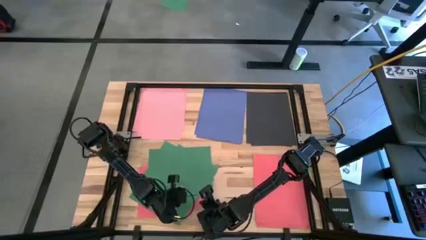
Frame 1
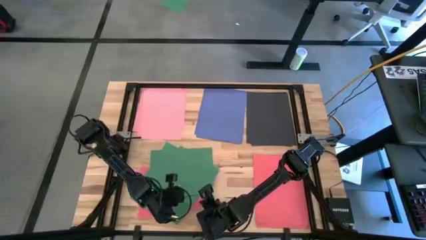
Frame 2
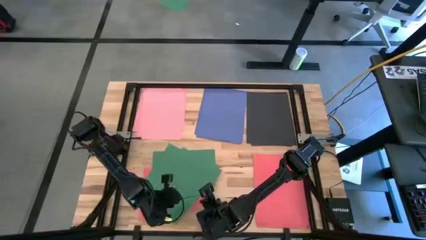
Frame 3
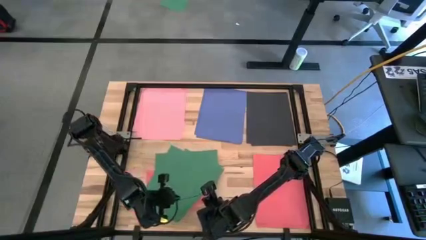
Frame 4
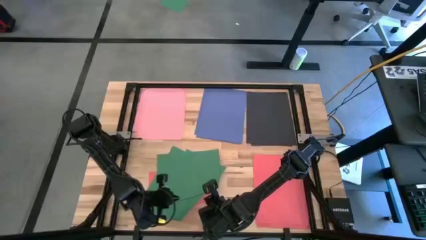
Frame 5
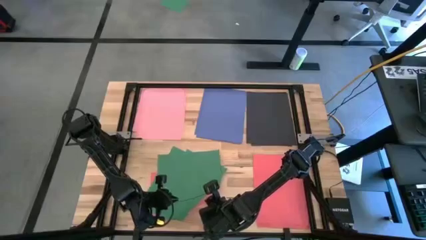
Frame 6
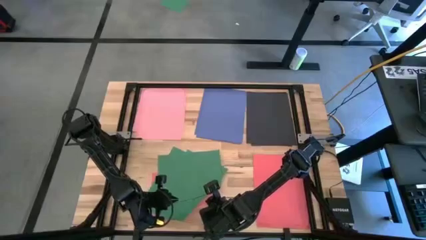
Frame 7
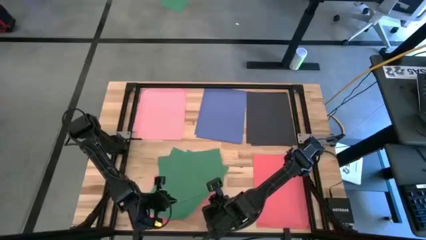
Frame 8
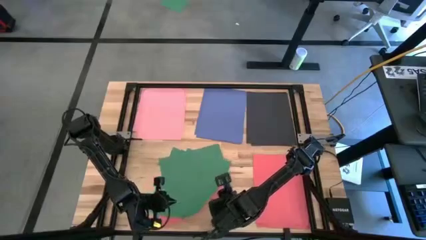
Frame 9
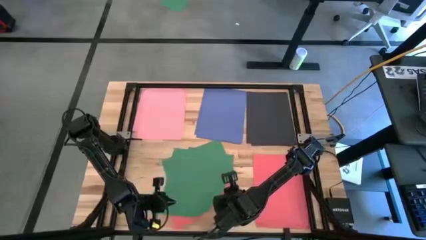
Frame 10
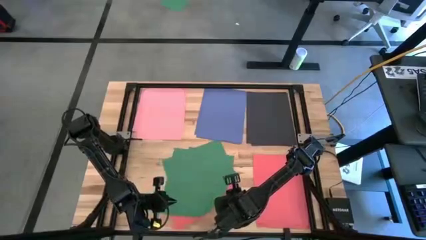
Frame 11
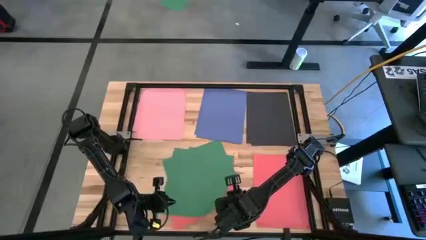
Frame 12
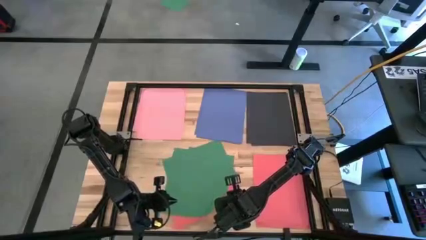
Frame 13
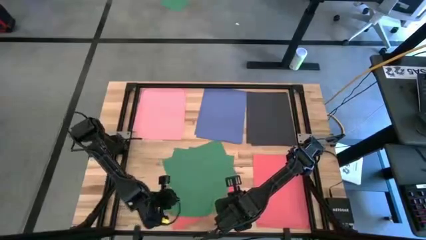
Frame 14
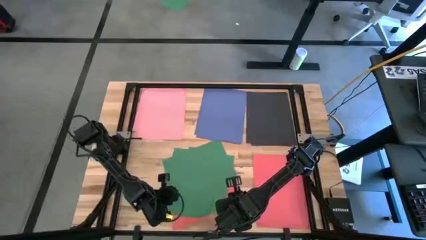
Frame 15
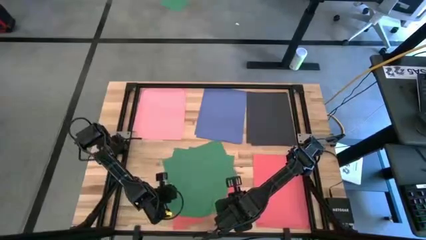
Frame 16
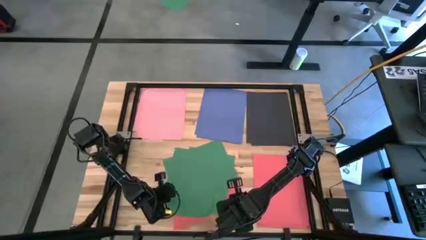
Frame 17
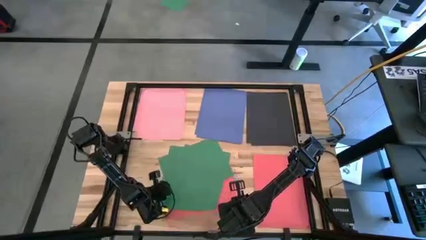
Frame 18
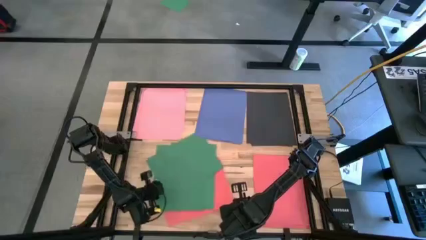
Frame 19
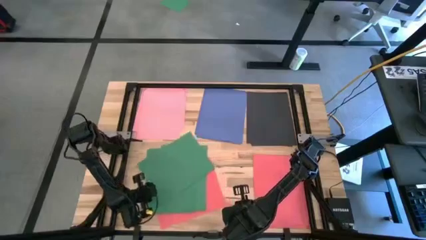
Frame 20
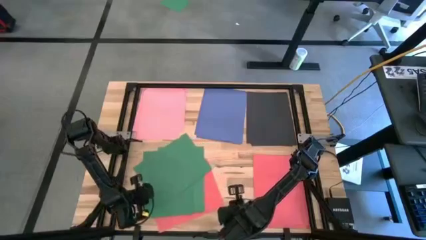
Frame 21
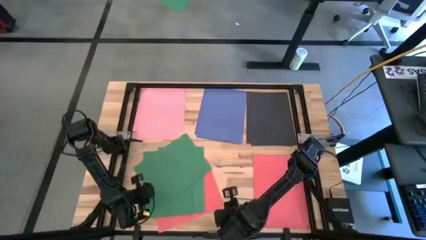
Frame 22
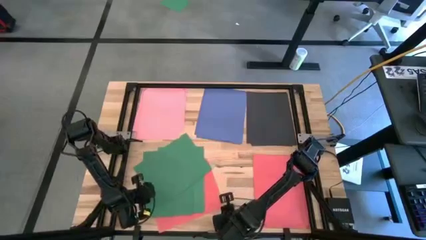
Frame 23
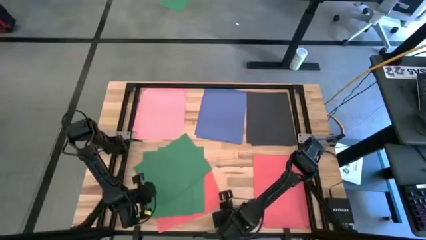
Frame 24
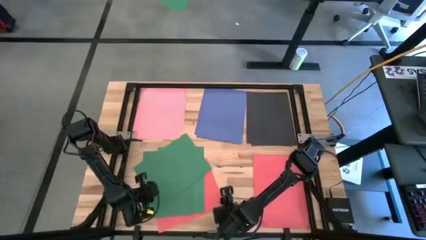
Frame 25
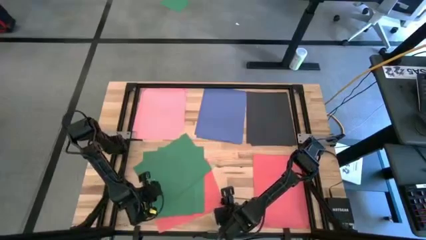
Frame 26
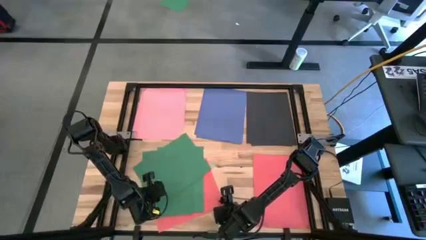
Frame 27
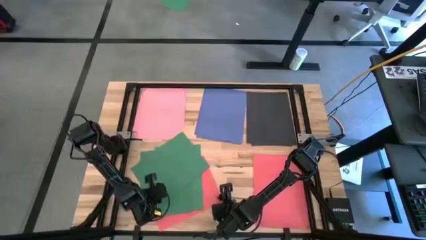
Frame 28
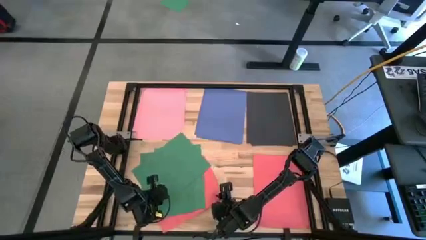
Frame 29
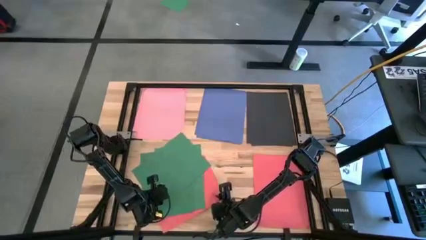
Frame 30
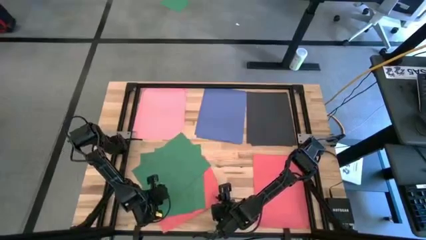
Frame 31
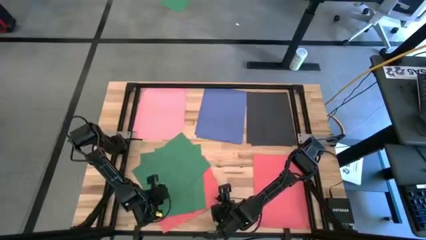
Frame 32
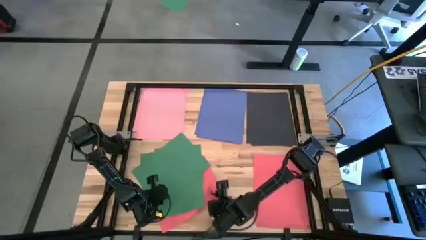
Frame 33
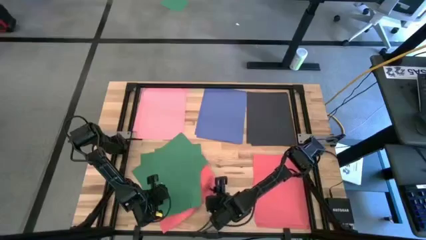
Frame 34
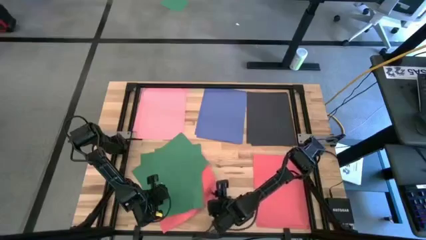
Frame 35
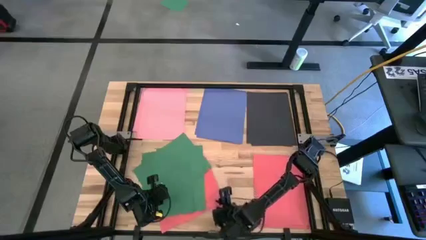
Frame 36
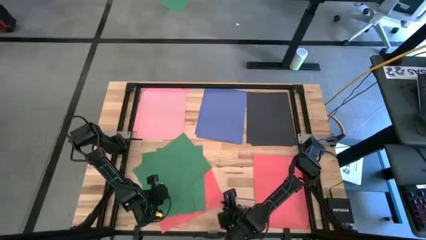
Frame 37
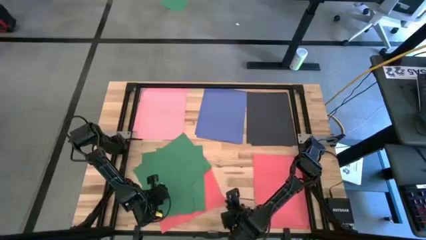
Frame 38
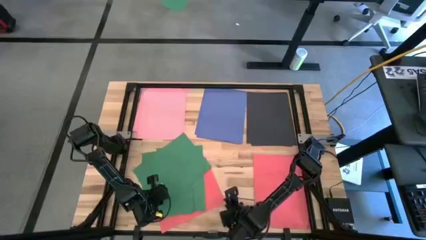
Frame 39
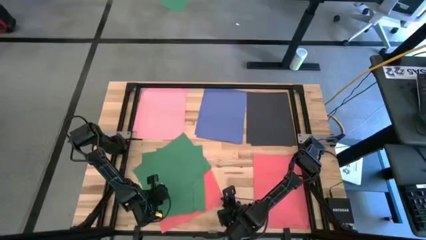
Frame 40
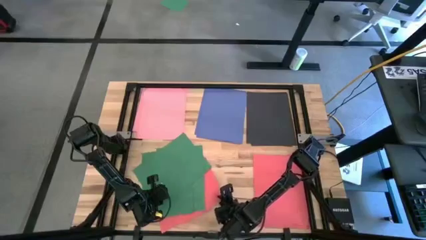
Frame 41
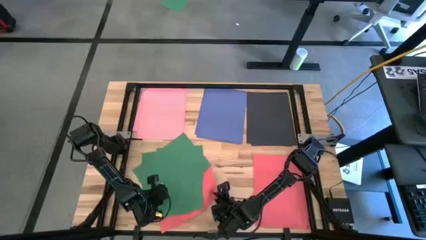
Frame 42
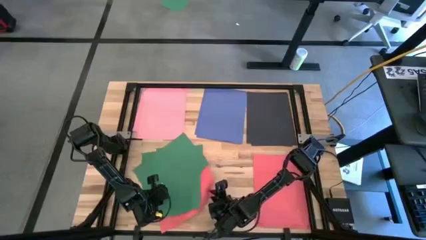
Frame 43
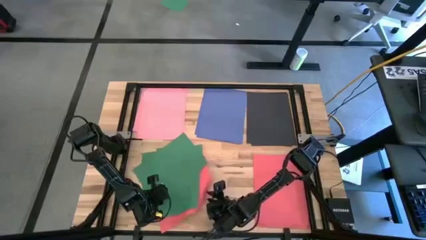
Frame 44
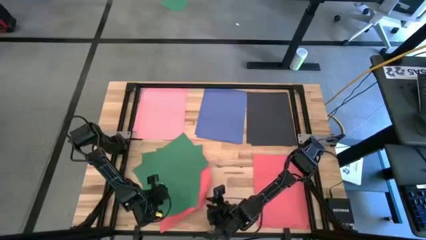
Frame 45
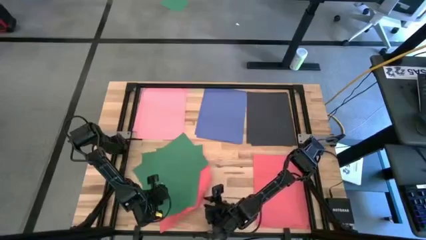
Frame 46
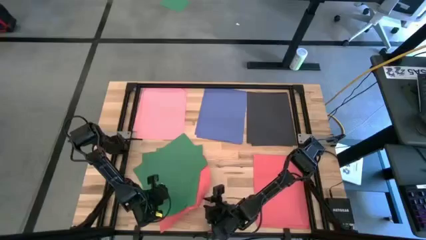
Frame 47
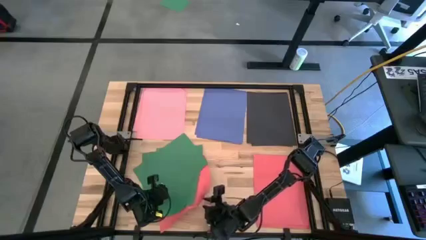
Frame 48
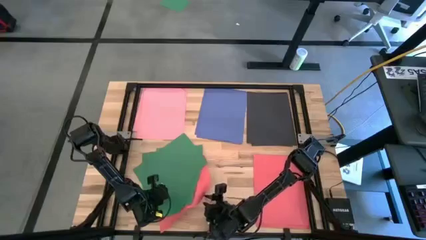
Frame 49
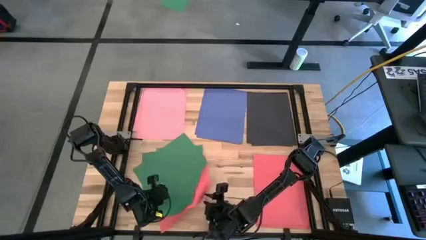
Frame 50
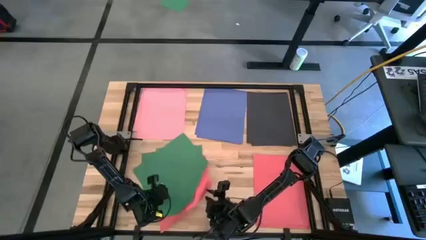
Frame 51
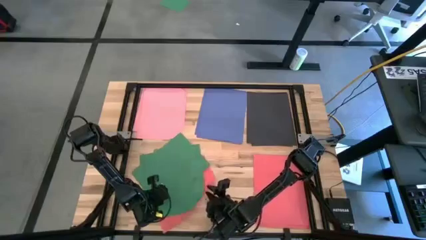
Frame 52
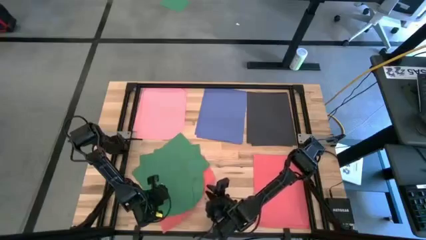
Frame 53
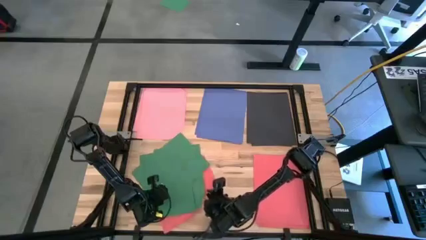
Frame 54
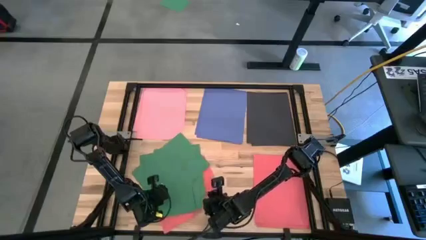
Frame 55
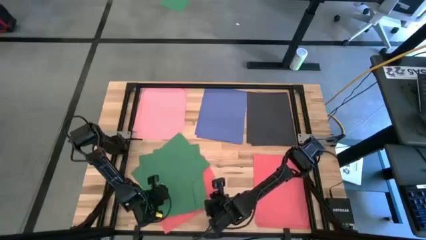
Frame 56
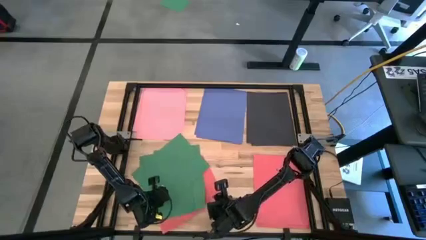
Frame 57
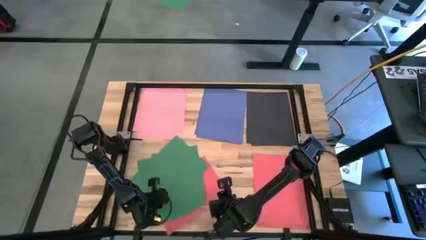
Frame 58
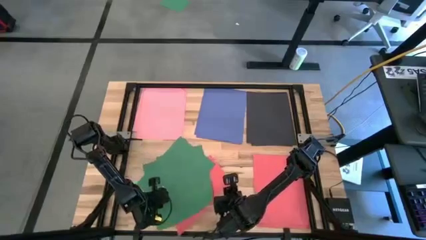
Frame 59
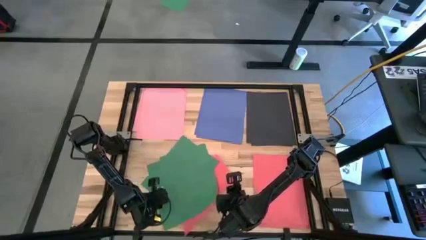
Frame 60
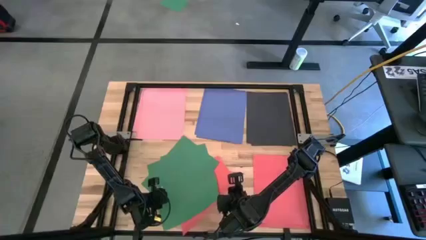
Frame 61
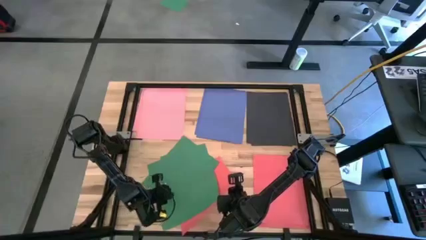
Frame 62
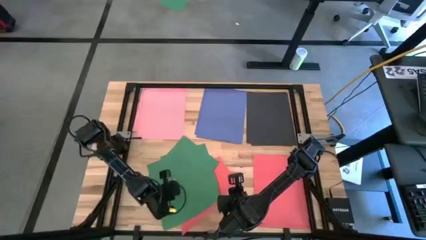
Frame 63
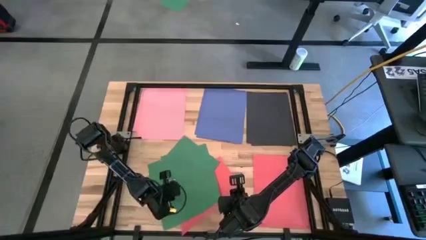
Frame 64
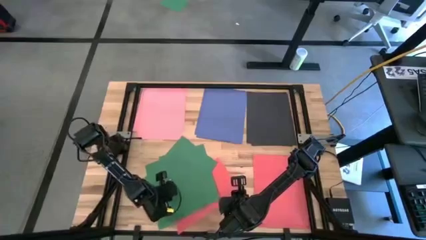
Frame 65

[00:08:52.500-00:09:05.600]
Task: Organize paper
Stack the red paper on top of the other red papers on the table
